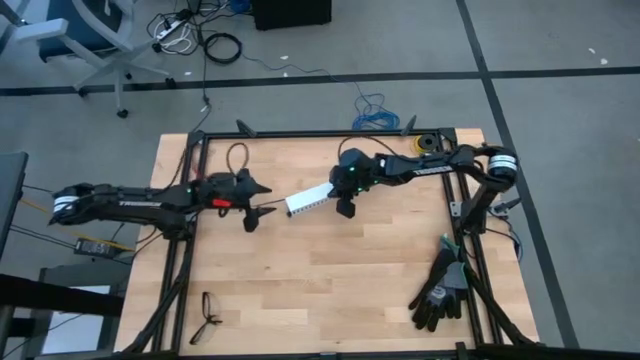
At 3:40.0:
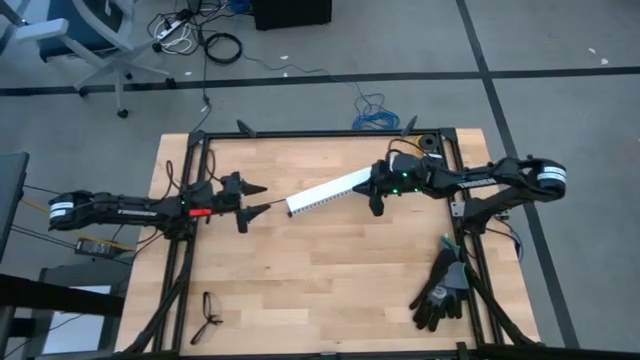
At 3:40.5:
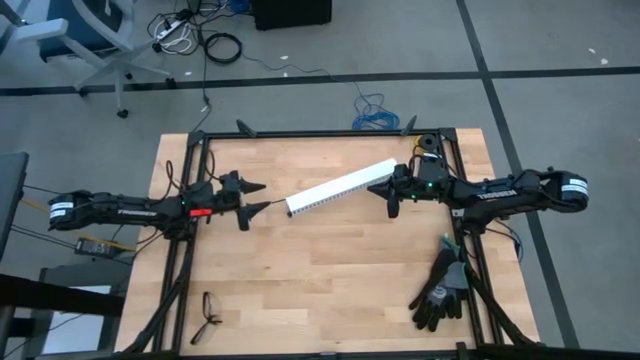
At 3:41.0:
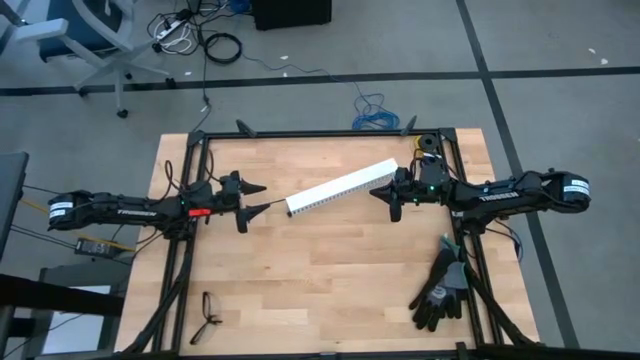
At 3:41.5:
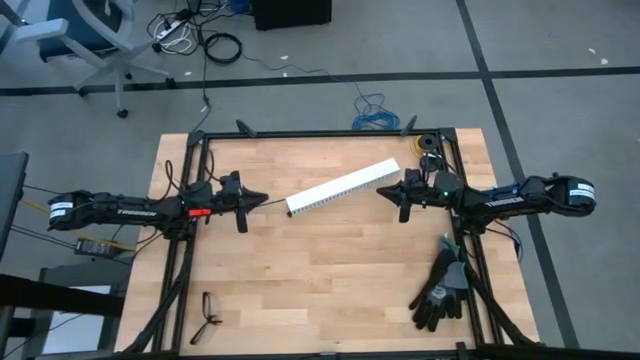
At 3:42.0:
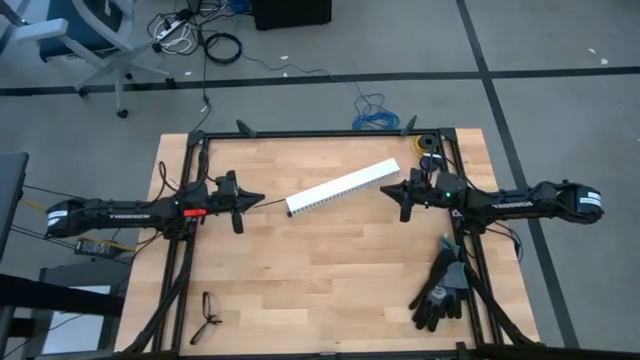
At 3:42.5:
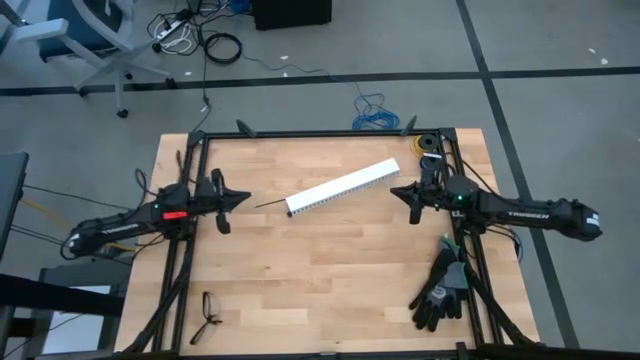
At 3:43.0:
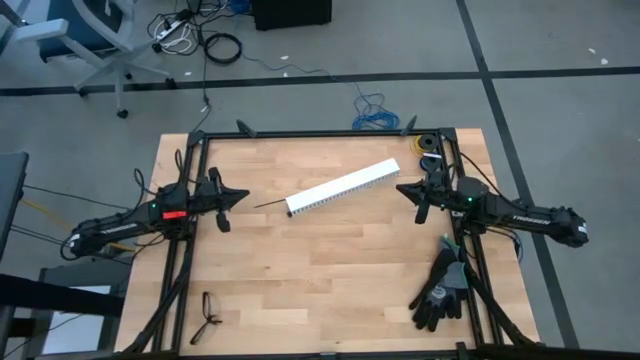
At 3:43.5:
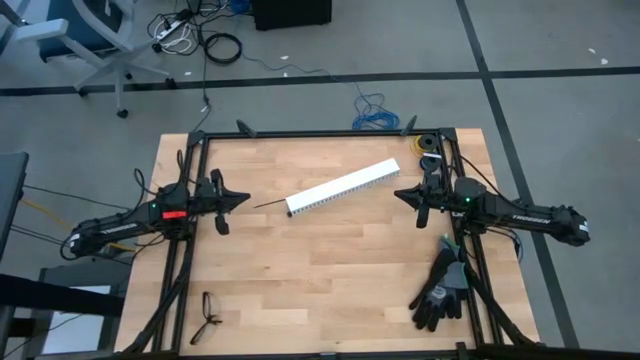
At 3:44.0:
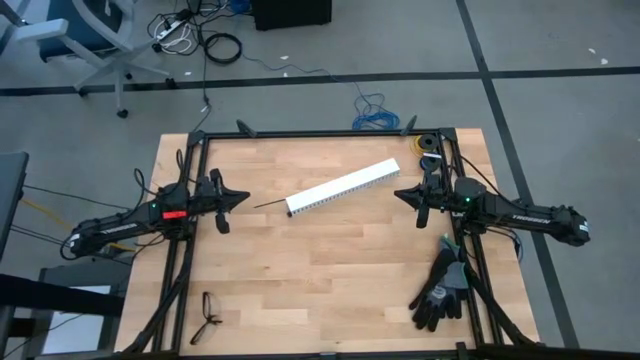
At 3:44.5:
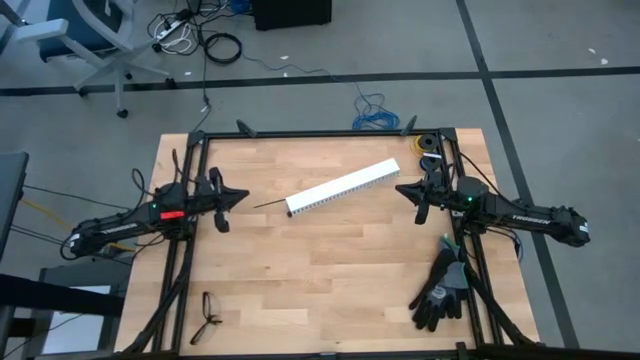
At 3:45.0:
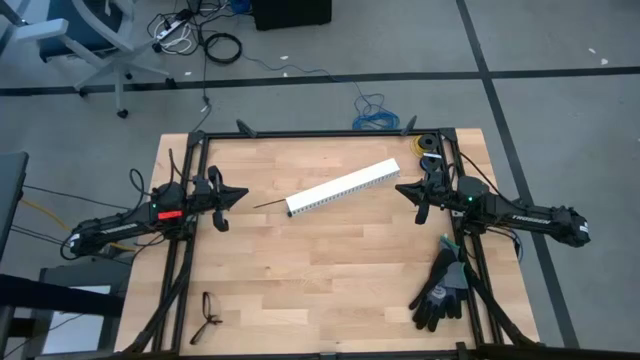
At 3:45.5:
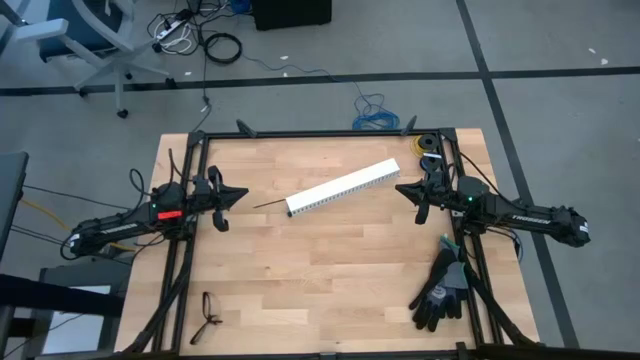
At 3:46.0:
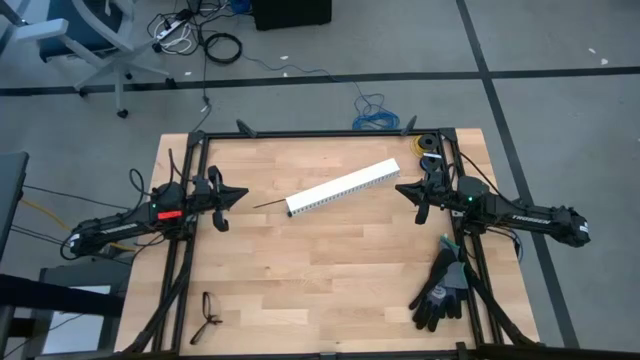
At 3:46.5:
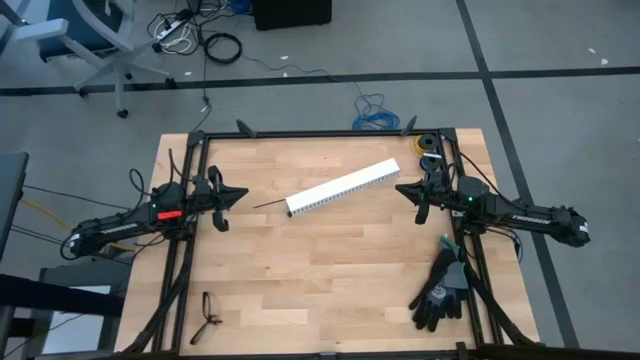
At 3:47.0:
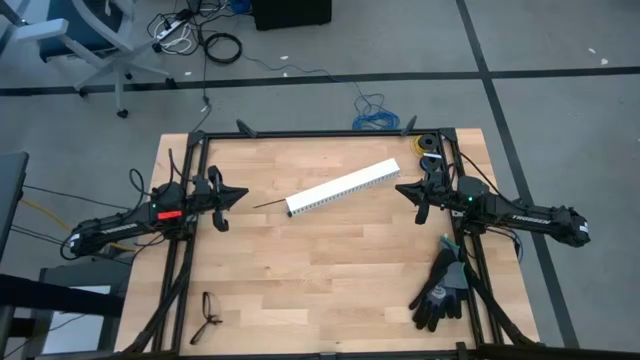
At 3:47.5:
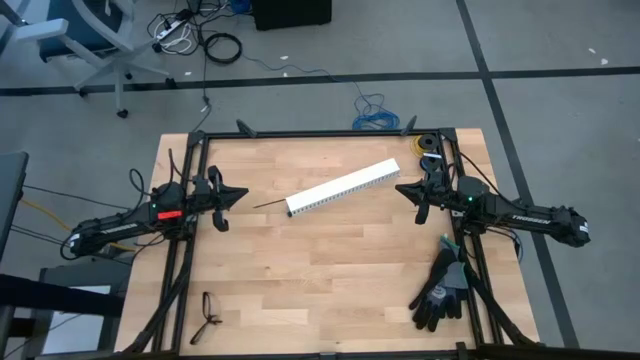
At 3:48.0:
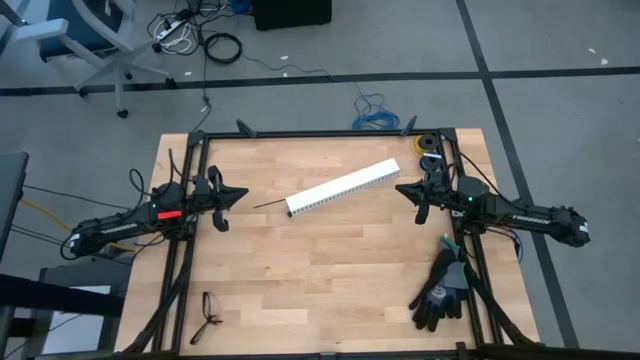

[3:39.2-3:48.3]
Task: Ziptie cables
Return to Home Position

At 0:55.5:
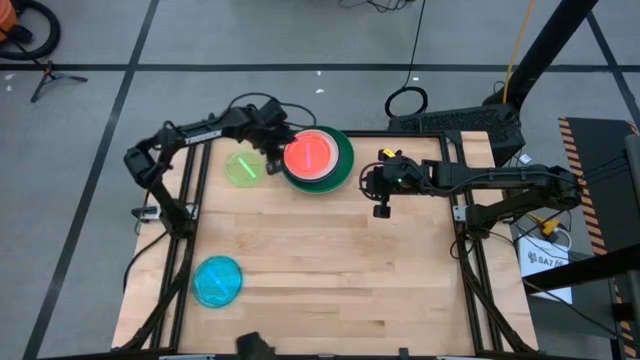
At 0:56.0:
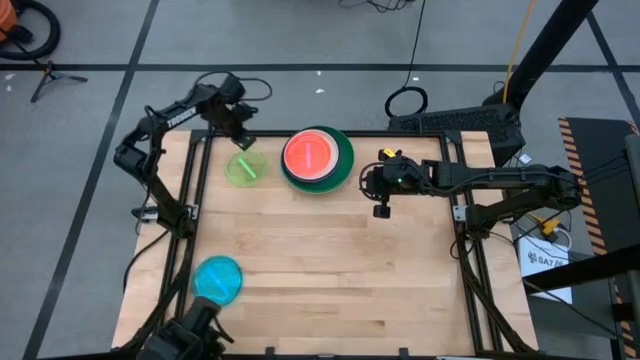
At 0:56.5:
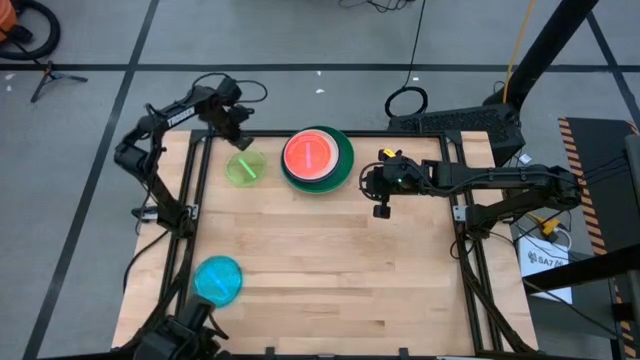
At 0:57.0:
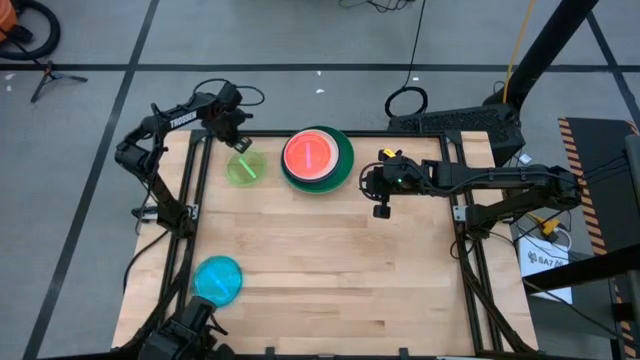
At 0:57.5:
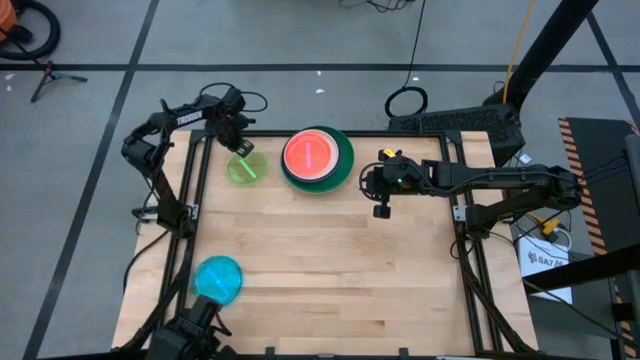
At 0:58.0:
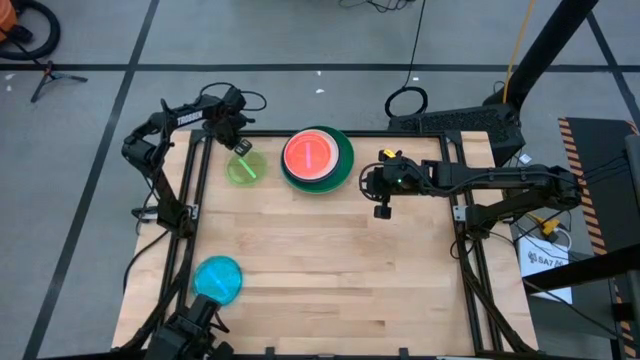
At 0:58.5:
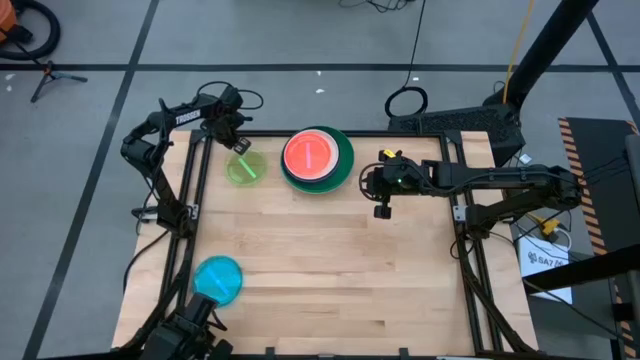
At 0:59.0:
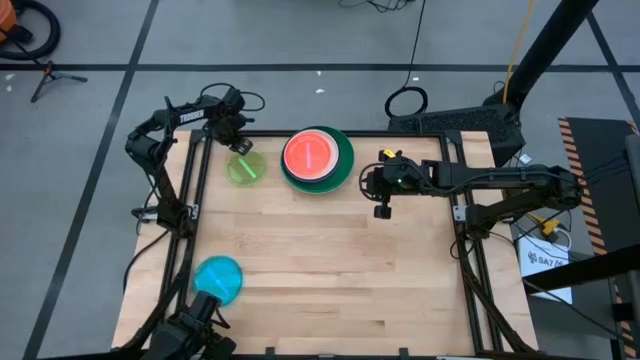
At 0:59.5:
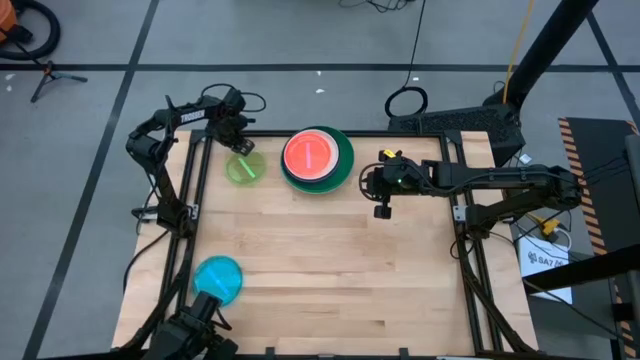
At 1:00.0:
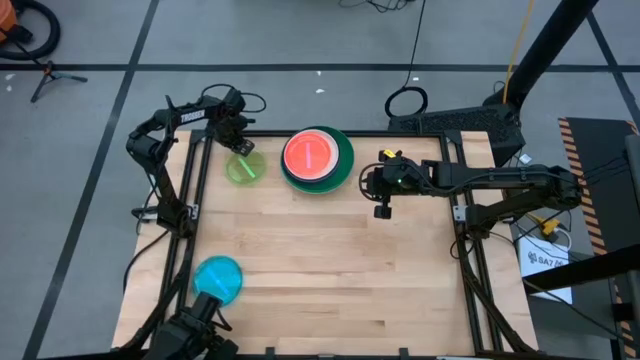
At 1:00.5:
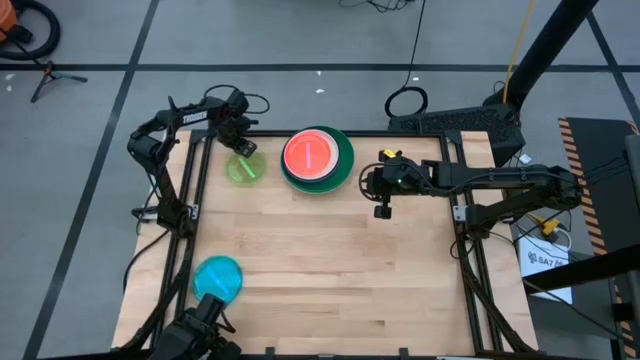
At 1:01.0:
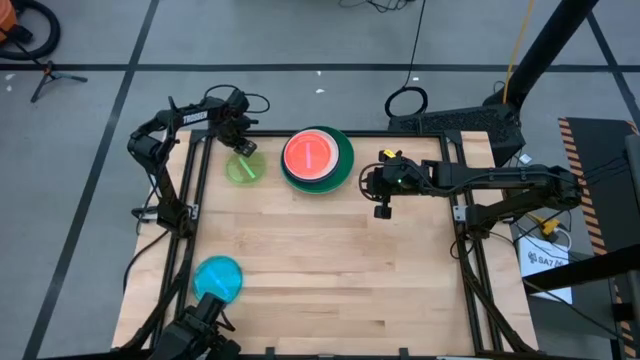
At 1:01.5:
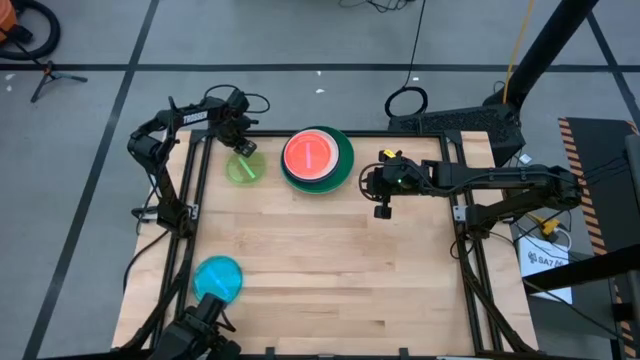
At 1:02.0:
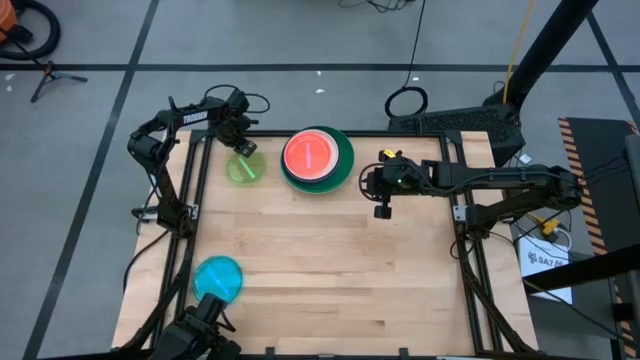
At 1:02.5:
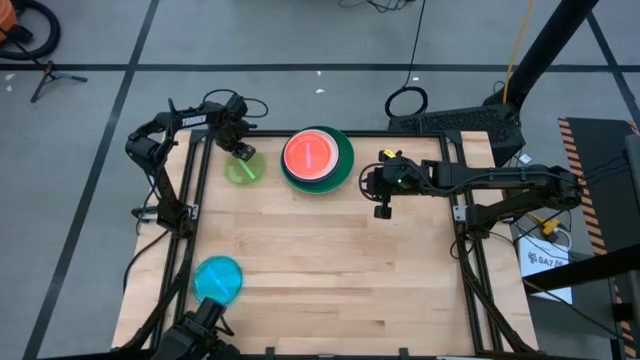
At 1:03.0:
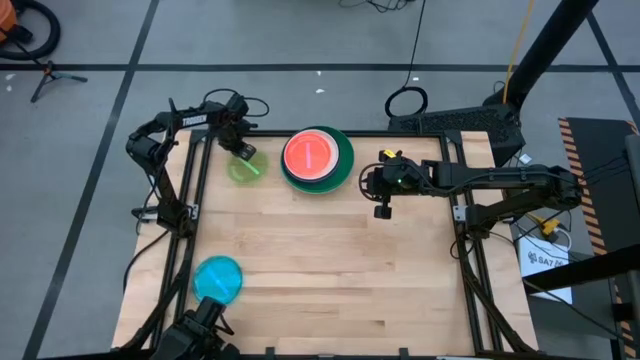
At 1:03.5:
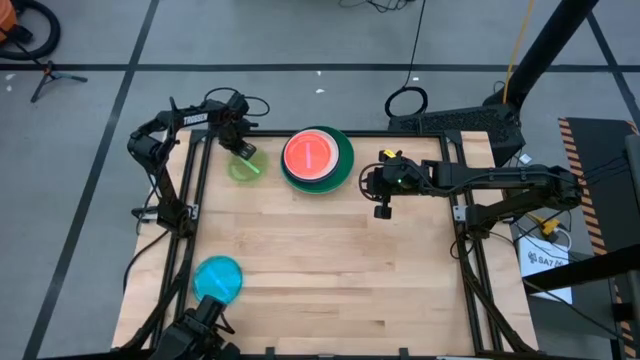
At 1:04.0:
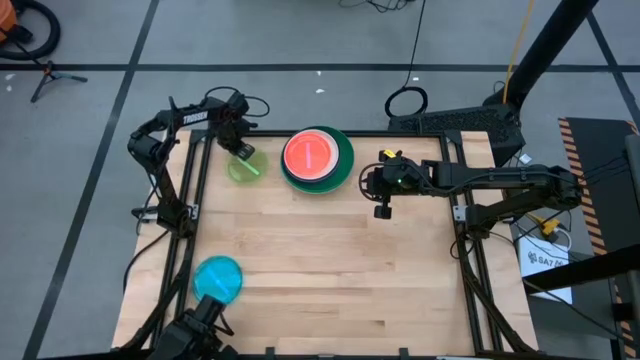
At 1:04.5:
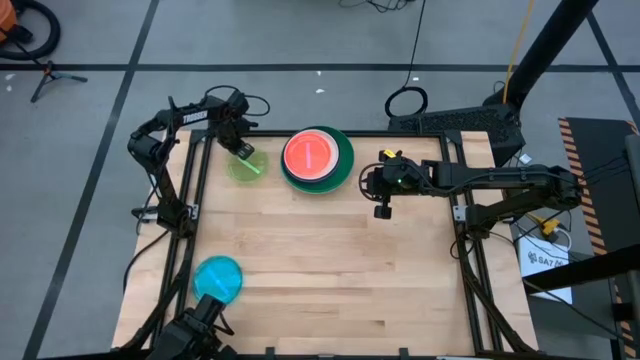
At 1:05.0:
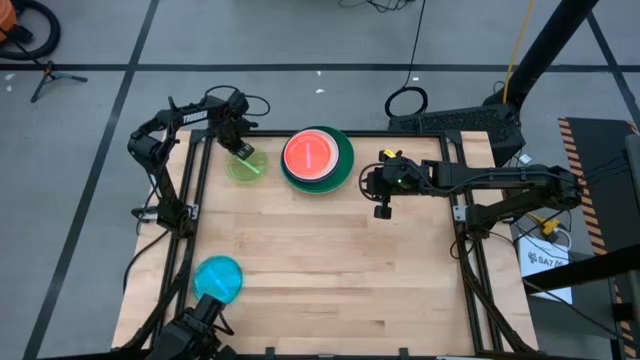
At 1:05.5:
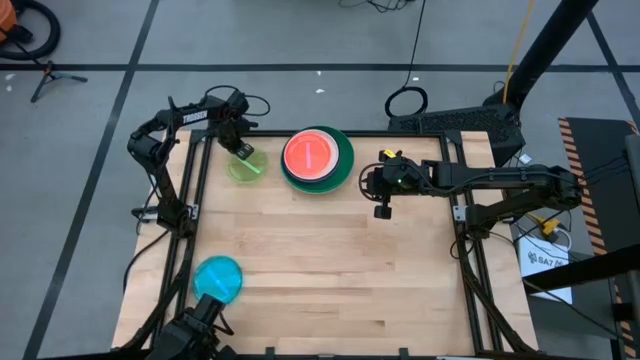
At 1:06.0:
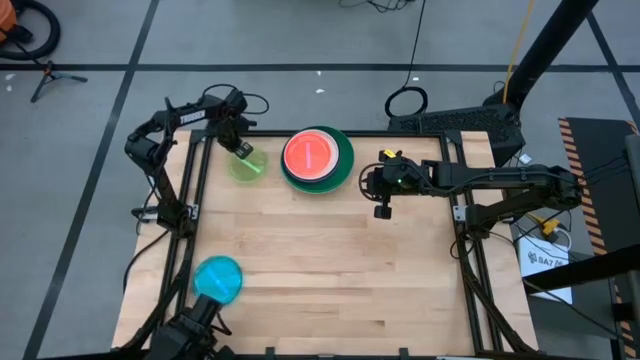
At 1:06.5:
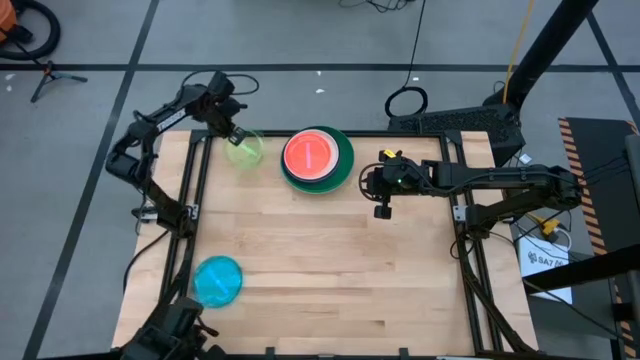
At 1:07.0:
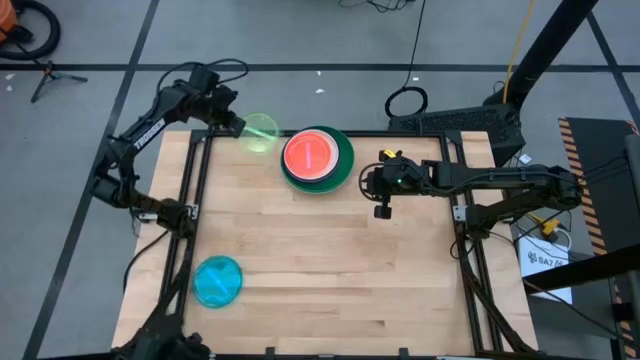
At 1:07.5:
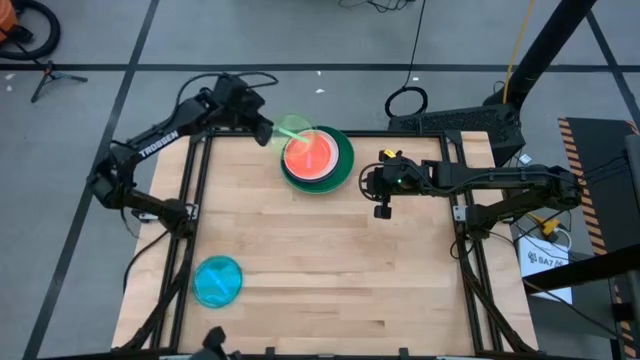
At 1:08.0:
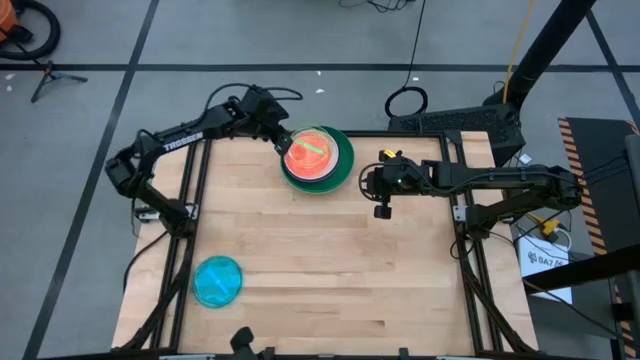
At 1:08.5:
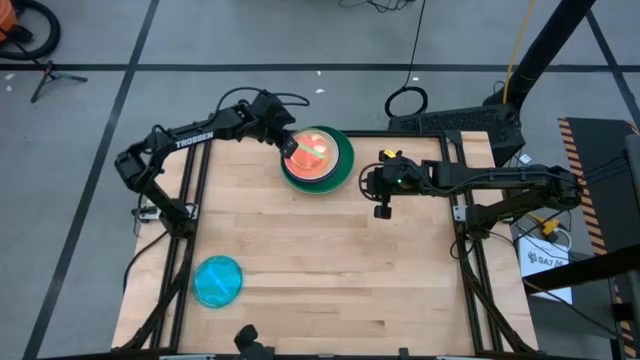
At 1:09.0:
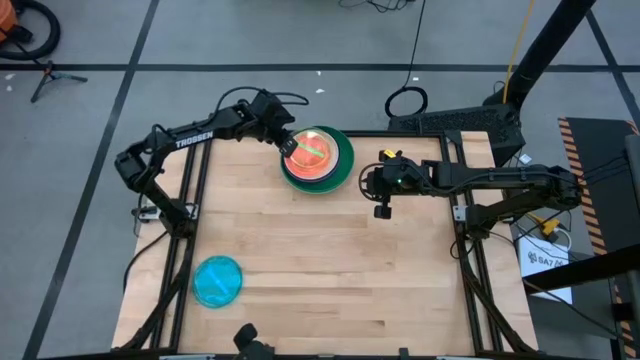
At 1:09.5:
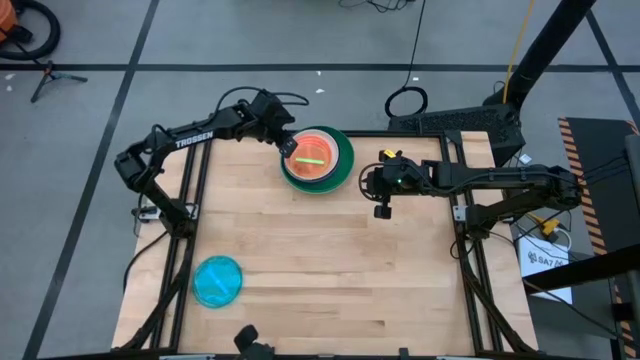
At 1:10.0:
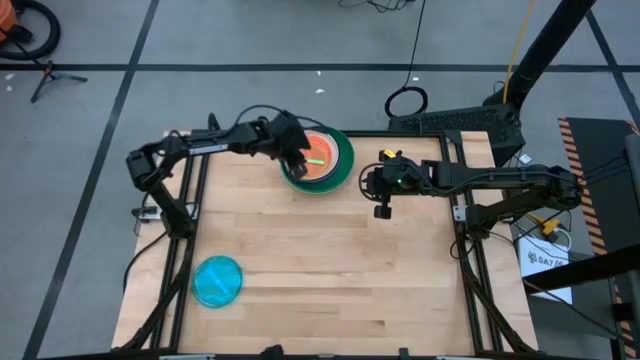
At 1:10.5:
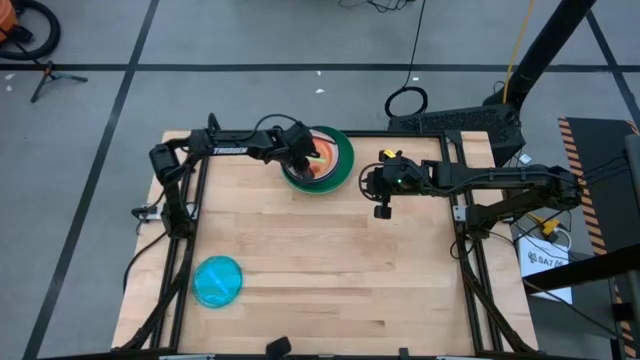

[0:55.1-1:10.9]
Task: Stack plastic plates
Stack the light green plate on top of the light pink plate
